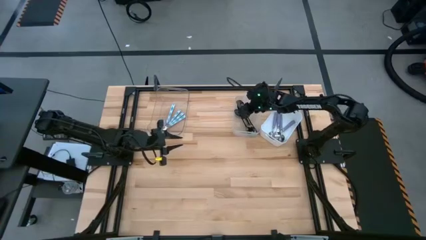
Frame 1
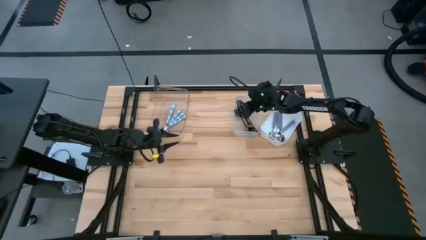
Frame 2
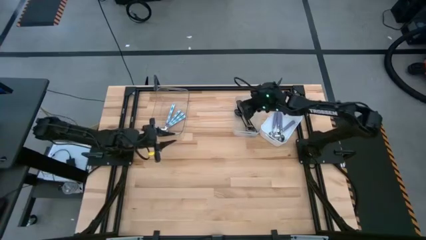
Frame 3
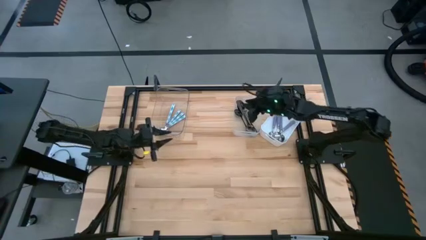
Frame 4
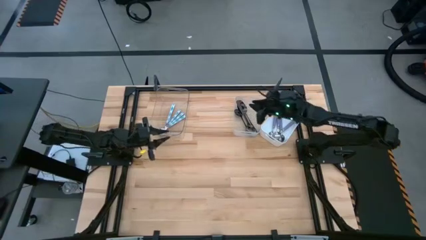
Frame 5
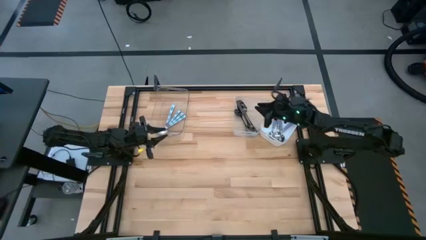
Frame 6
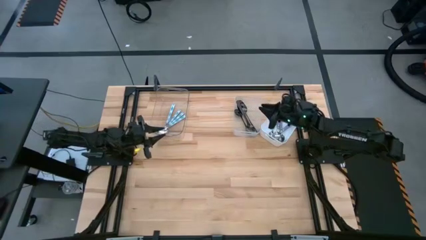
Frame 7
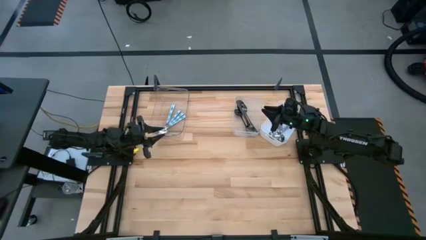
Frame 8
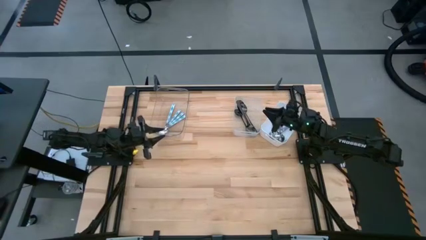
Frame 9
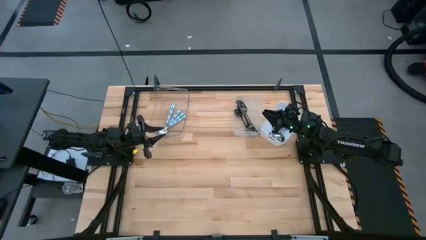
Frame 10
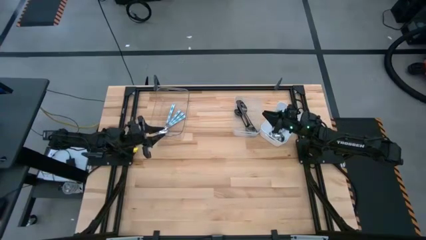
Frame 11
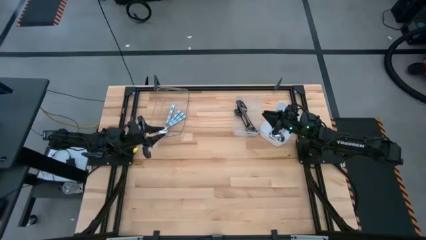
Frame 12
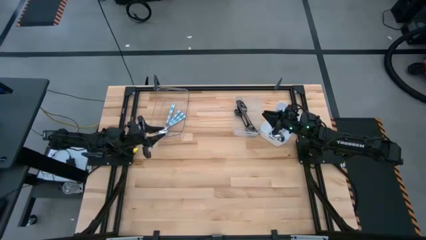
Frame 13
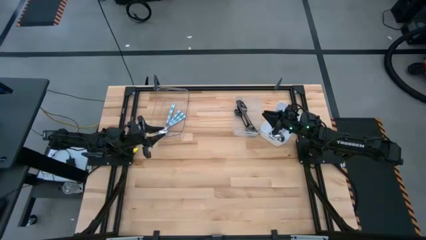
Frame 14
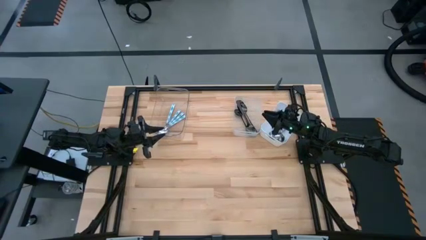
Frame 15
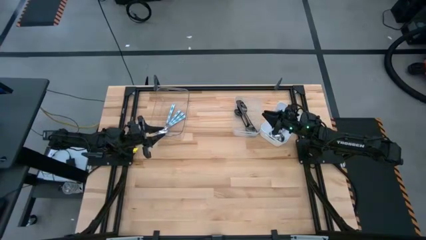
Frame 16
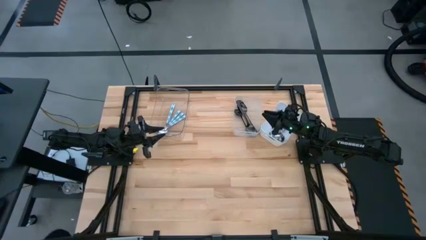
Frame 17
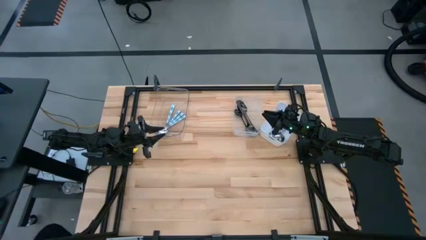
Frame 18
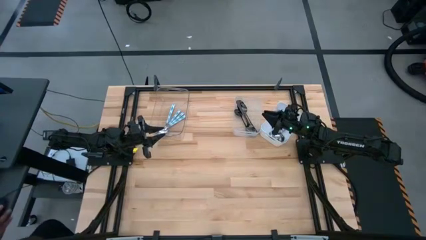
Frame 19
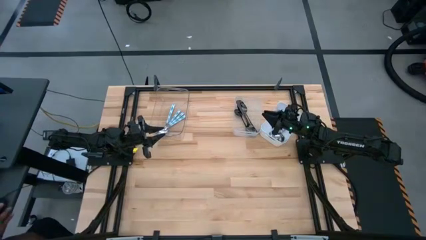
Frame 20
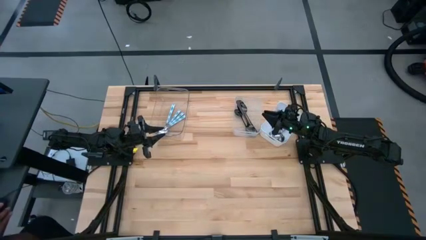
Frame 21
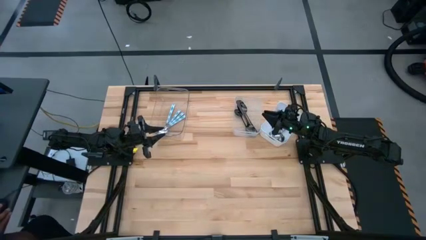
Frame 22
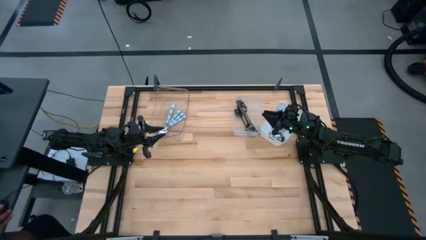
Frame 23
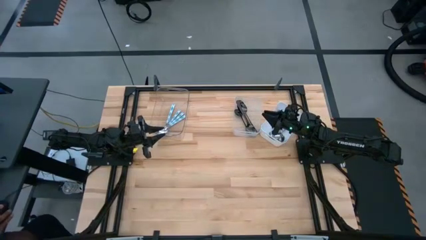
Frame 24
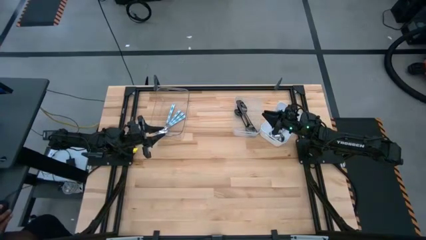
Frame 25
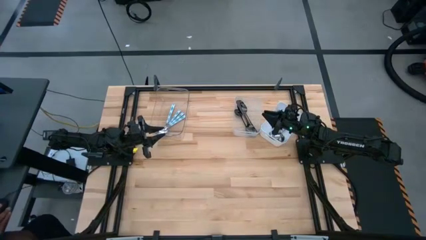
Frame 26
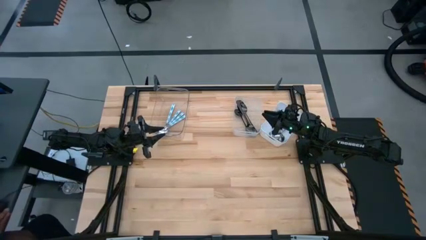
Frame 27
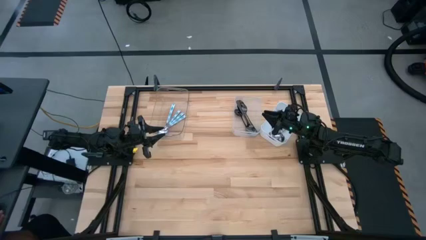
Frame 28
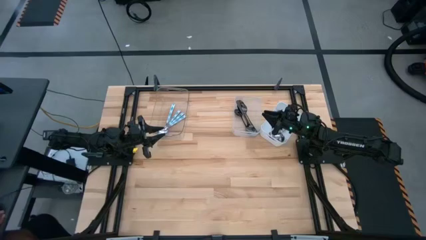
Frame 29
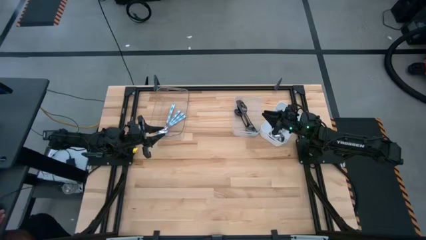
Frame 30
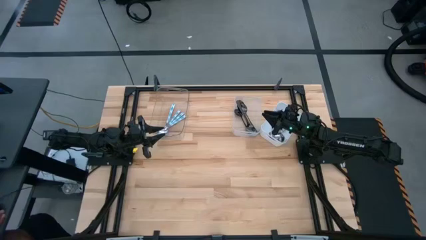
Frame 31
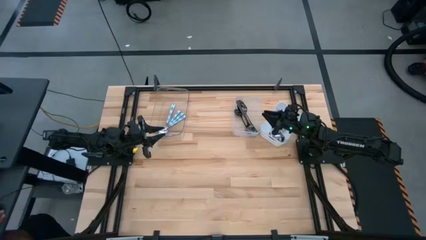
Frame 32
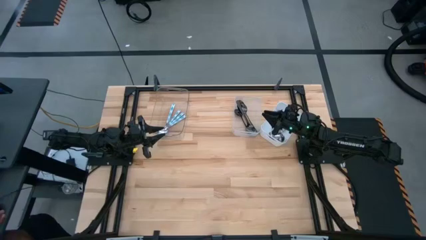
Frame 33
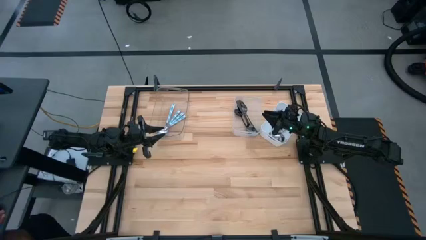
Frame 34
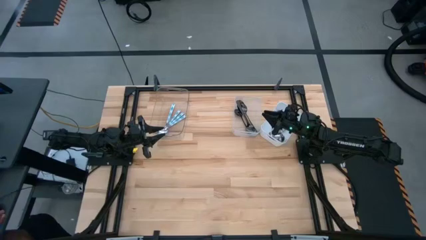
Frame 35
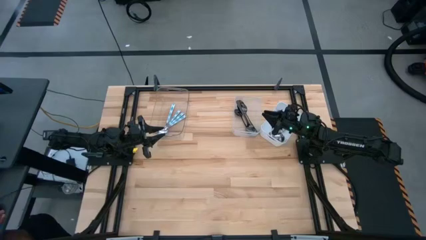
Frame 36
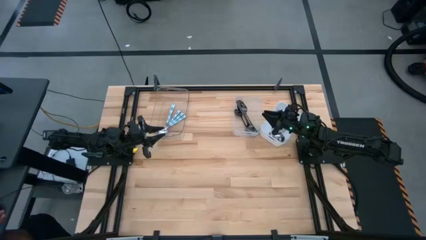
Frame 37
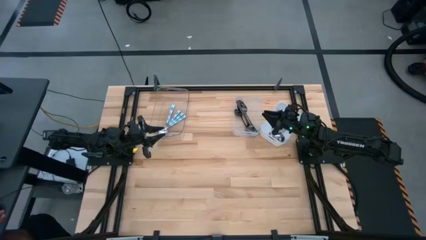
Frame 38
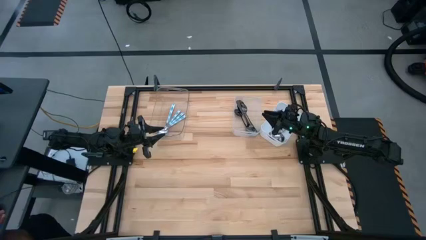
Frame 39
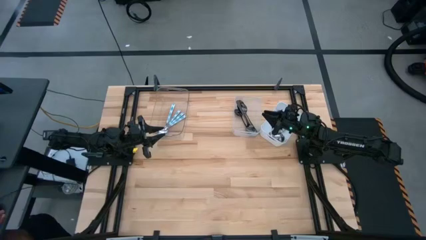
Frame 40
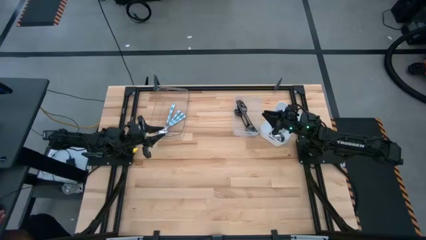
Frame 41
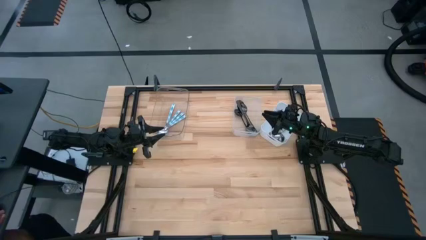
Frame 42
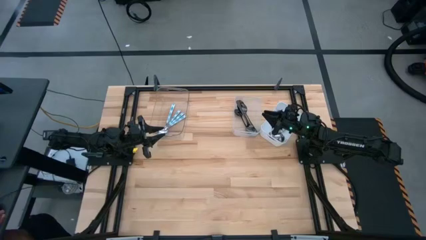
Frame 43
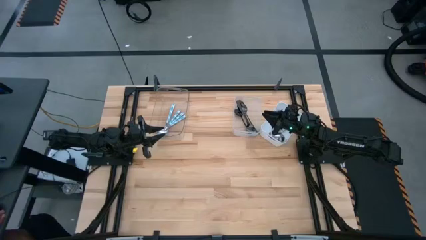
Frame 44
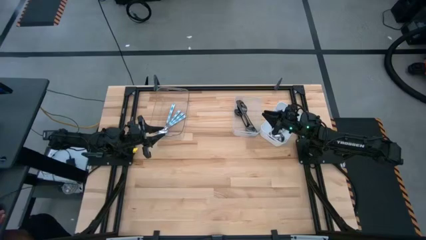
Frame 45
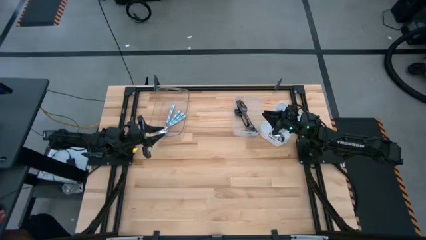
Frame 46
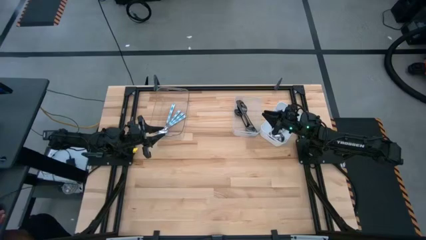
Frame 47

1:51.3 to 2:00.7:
Task: Sort silverware by color (type)
Return to Home Position

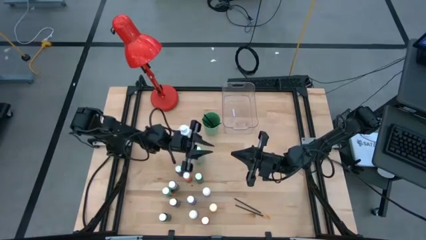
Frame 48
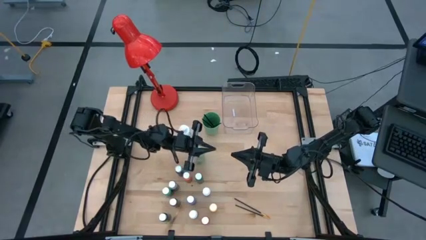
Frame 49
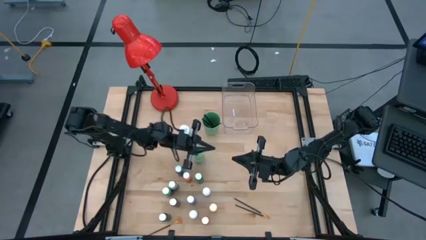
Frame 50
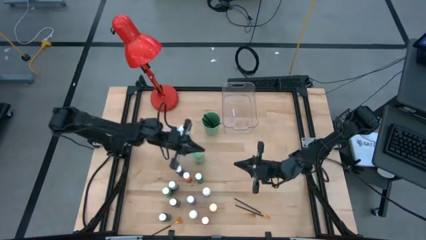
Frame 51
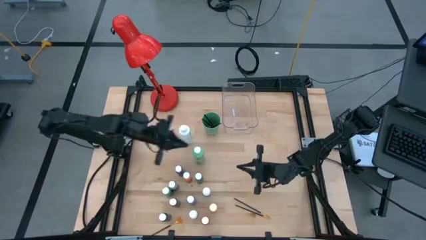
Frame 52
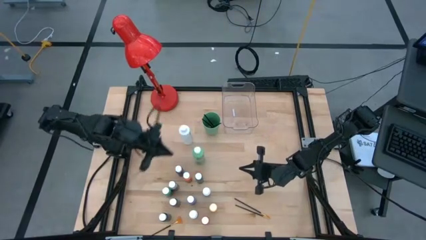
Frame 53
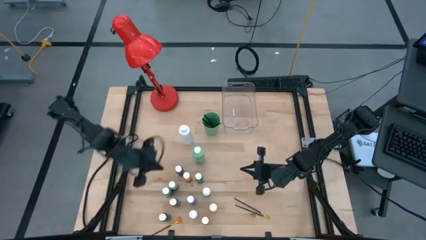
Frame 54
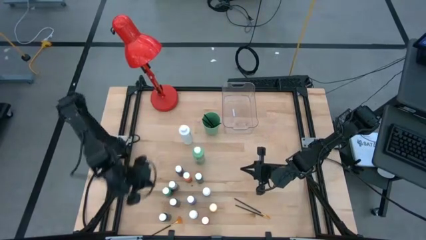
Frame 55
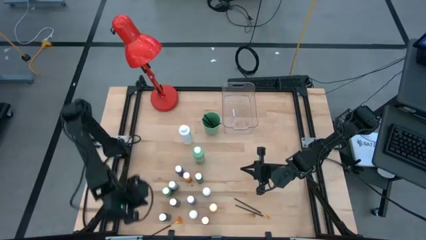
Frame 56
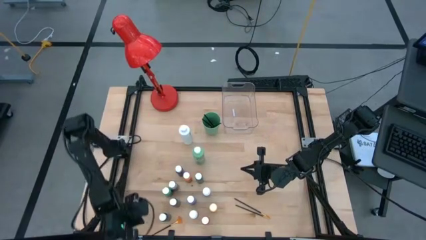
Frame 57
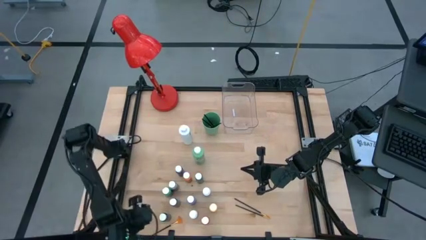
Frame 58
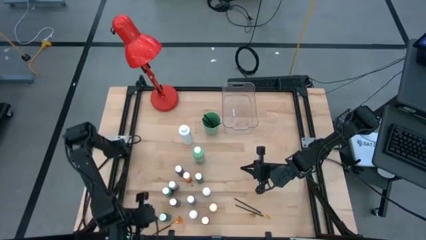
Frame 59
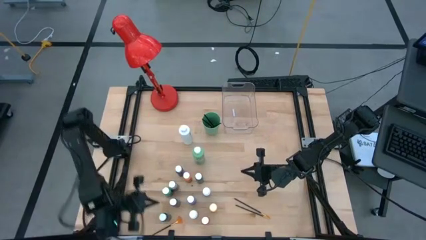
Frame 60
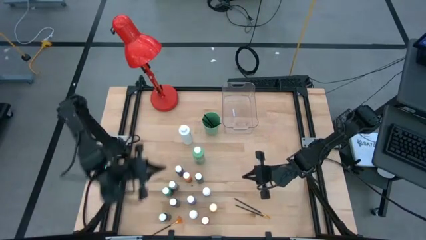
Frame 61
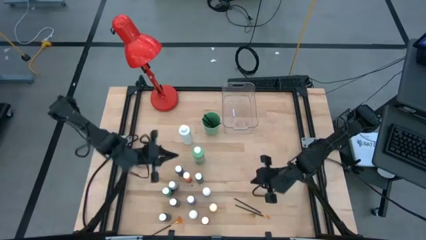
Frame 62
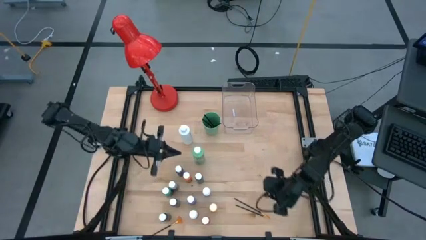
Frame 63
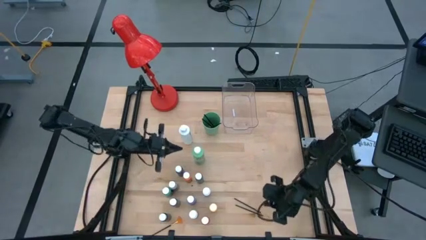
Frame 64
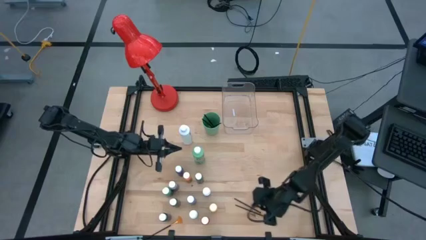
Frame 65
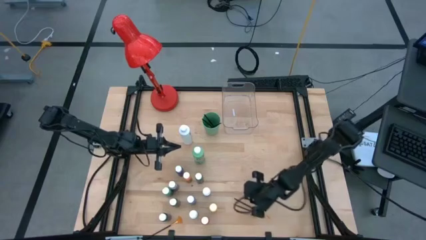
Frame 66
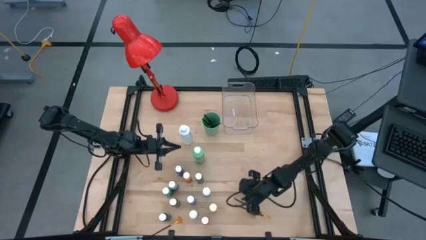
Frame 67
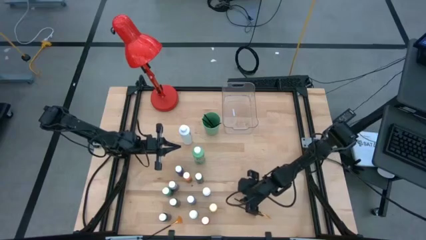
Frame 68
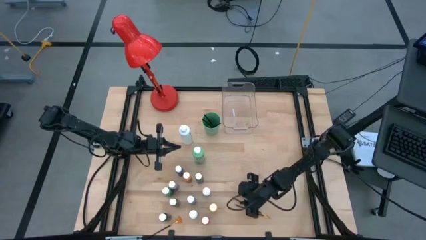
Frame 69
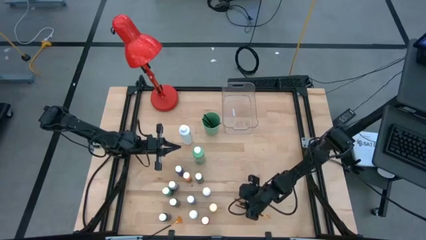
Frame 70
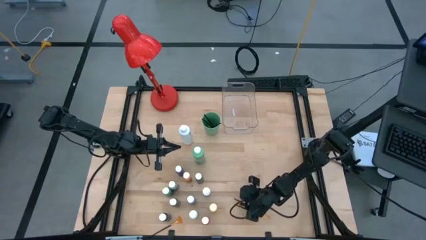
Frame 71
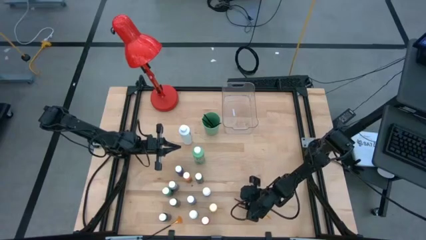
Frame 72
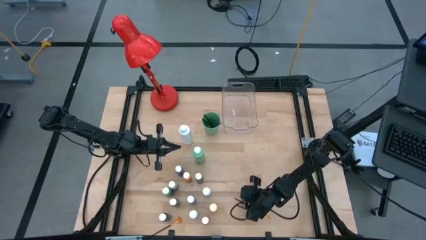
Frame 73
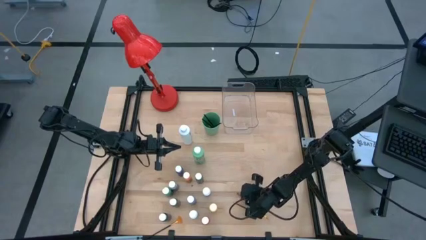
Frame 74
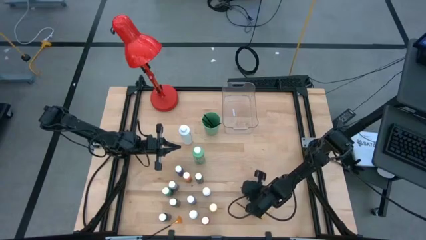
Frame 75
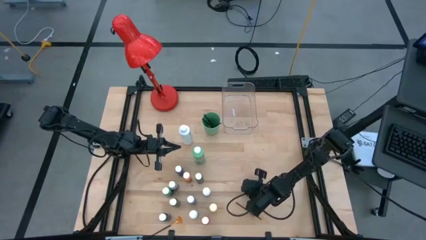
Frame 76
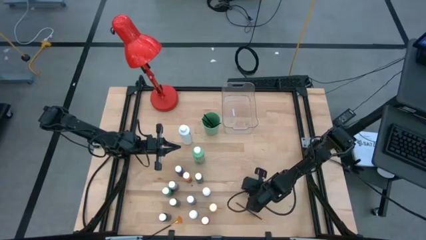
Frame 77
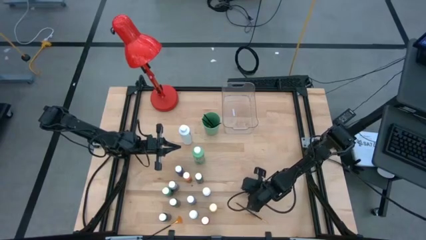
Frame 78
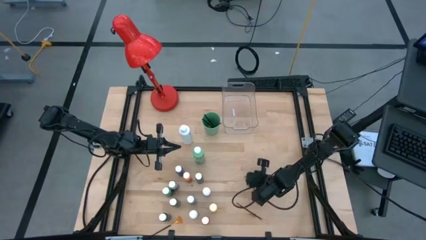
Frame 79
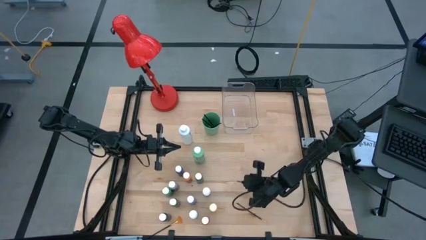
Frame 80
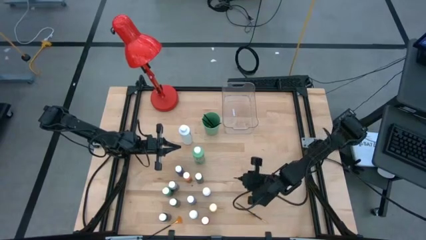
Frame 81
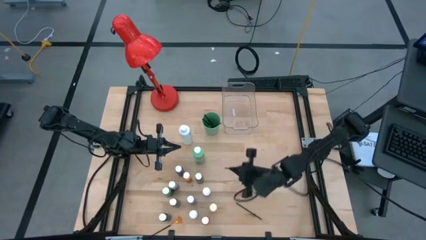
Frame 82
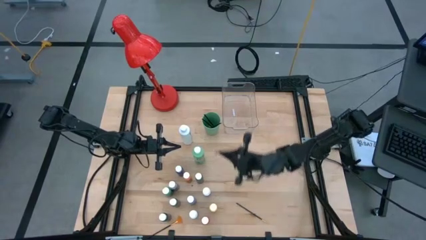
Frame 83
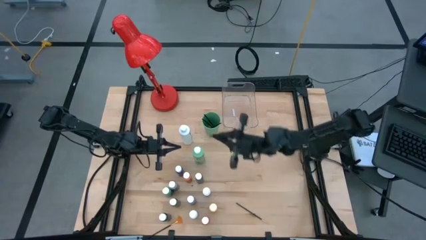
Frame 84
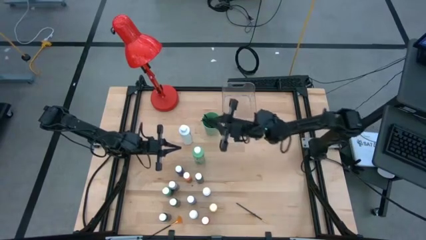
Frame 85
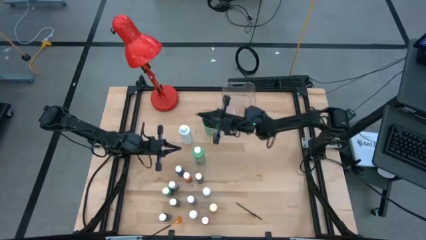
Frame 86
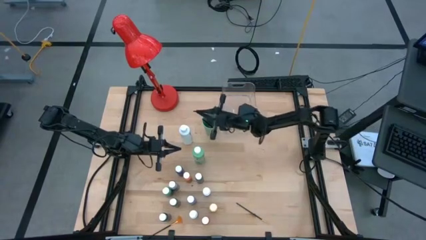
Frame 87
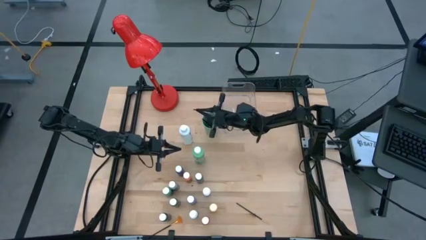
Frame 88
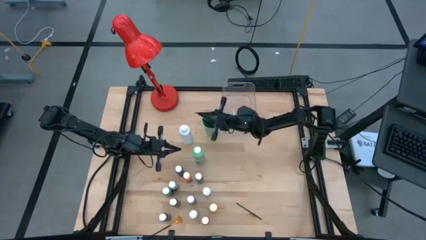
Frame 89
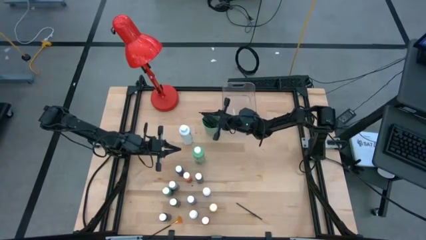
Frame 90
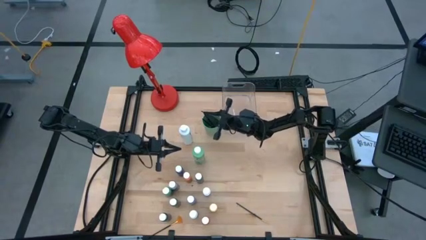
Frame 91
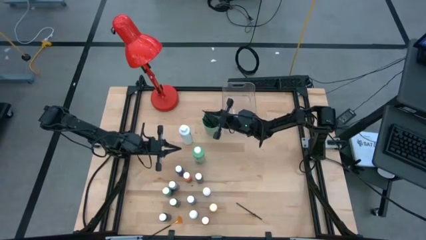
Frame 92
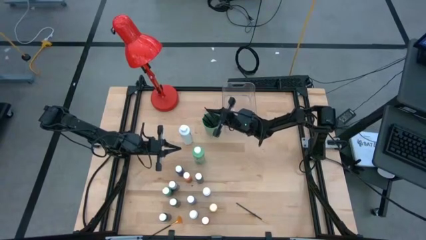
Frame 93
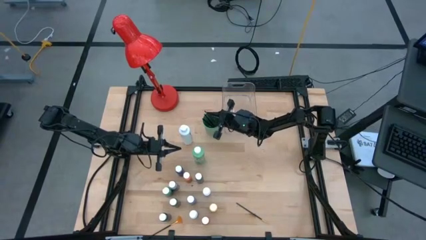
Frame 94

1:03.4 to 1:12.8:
Task: Pick & Place Paint Supplies
Put the orange paint brush into the green cup
